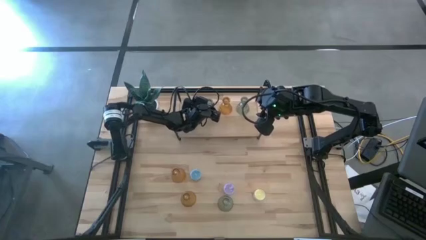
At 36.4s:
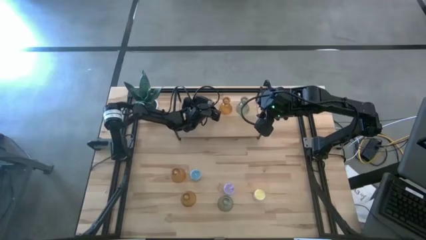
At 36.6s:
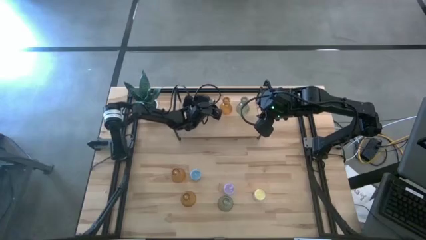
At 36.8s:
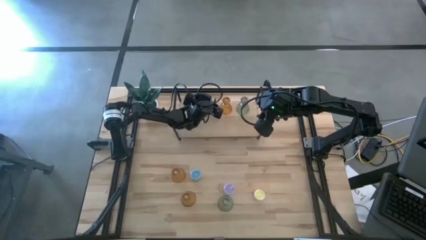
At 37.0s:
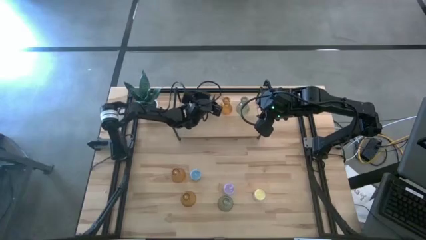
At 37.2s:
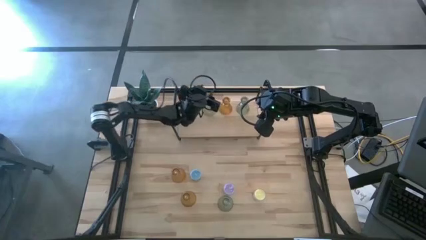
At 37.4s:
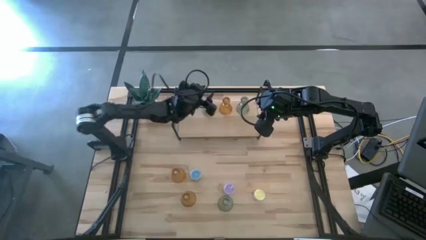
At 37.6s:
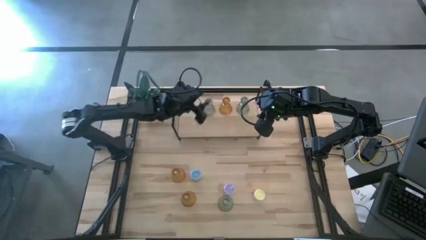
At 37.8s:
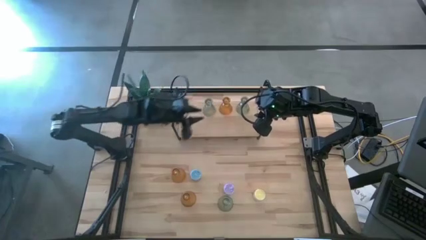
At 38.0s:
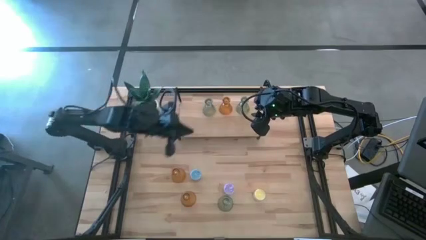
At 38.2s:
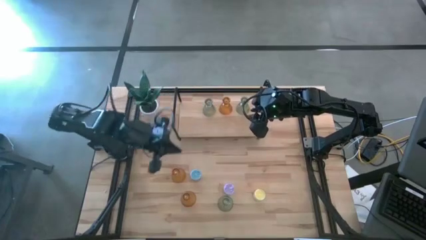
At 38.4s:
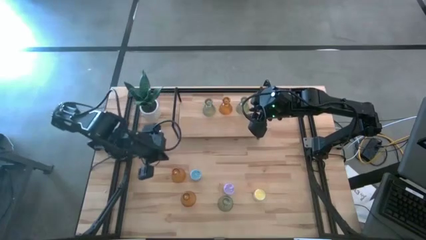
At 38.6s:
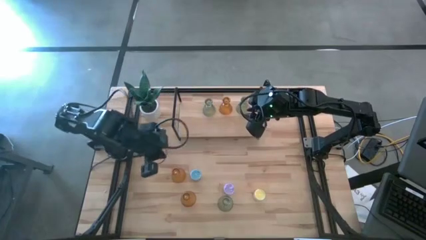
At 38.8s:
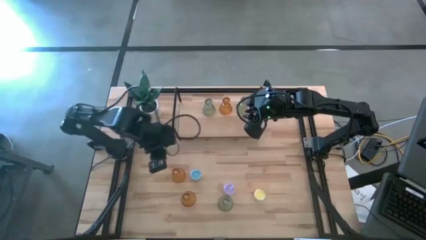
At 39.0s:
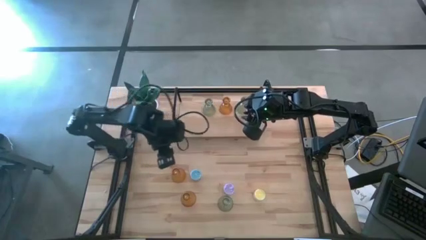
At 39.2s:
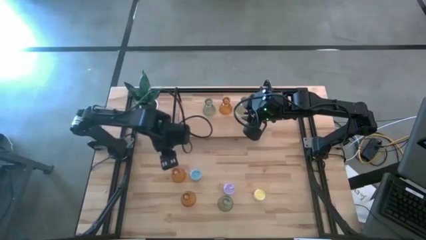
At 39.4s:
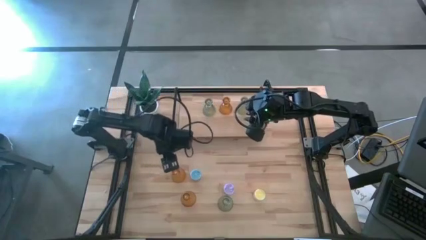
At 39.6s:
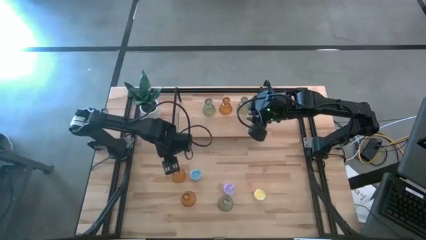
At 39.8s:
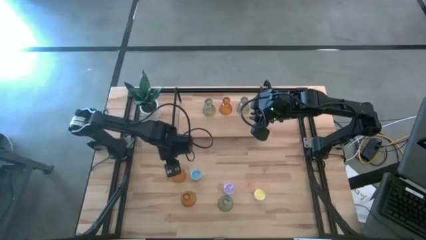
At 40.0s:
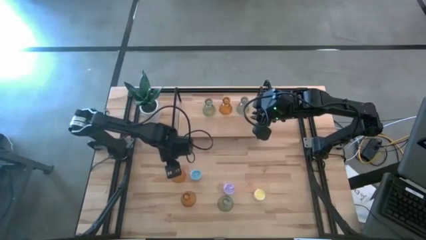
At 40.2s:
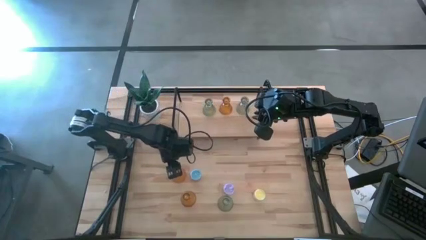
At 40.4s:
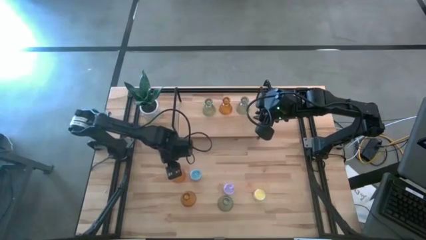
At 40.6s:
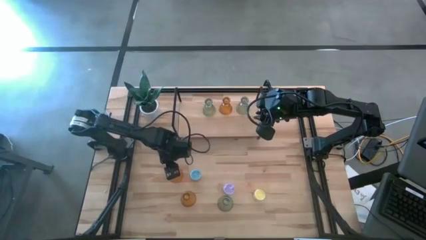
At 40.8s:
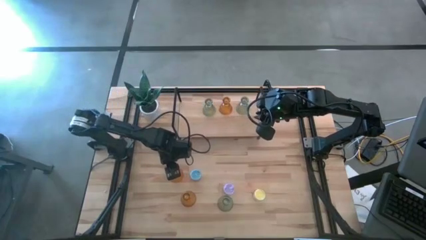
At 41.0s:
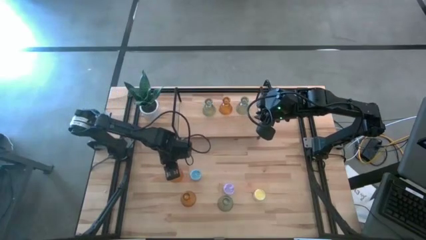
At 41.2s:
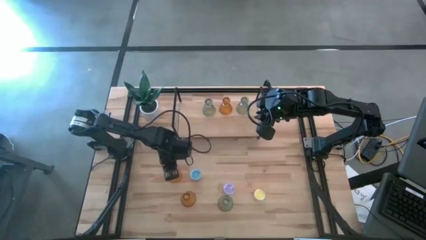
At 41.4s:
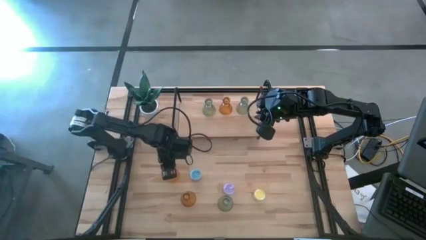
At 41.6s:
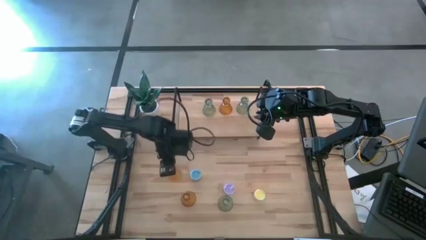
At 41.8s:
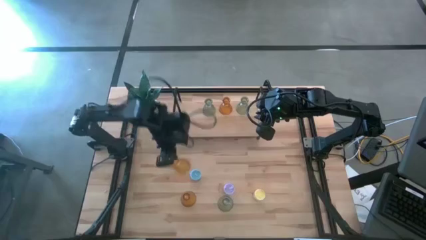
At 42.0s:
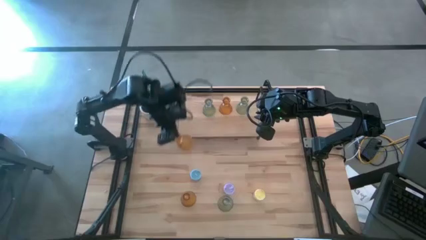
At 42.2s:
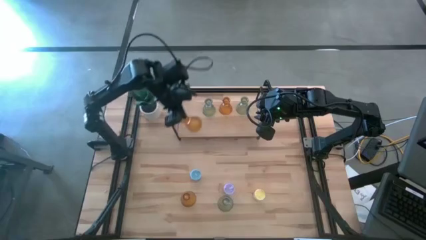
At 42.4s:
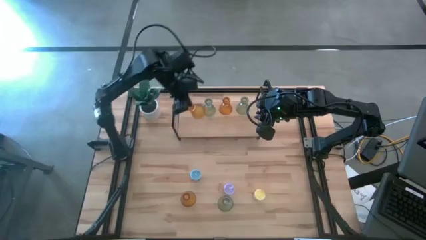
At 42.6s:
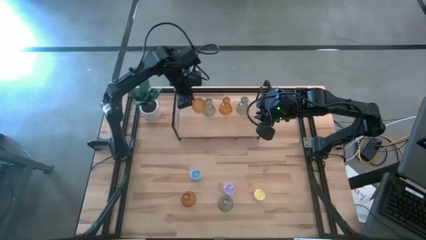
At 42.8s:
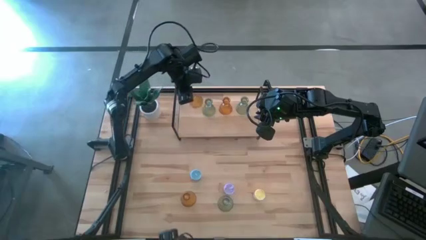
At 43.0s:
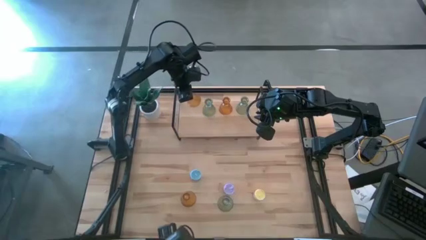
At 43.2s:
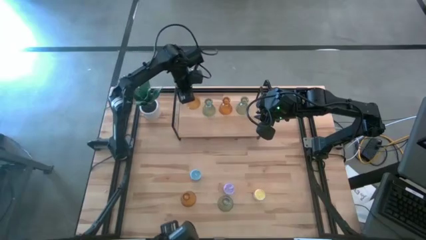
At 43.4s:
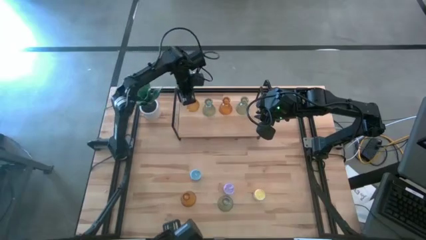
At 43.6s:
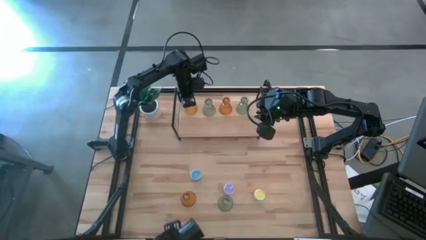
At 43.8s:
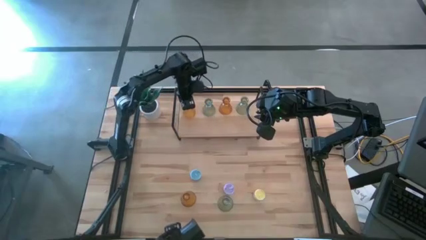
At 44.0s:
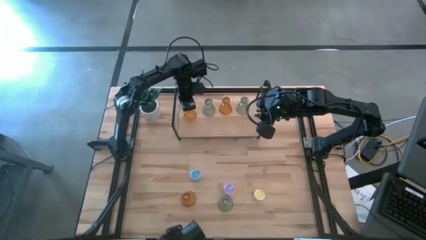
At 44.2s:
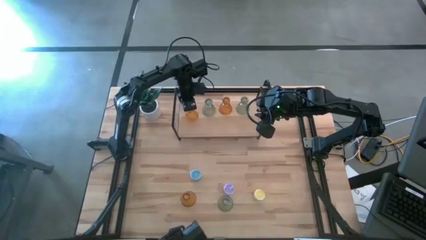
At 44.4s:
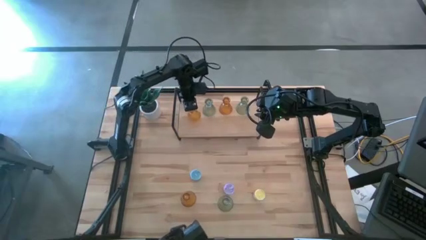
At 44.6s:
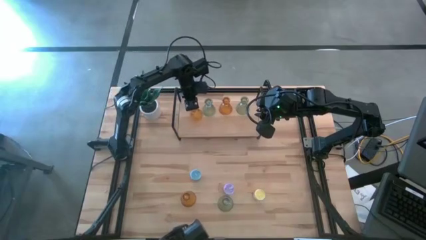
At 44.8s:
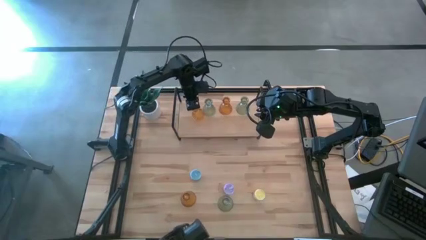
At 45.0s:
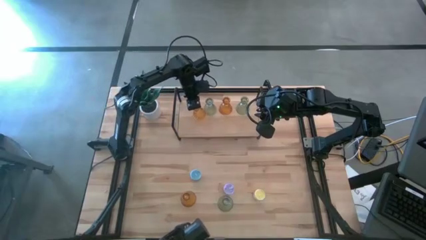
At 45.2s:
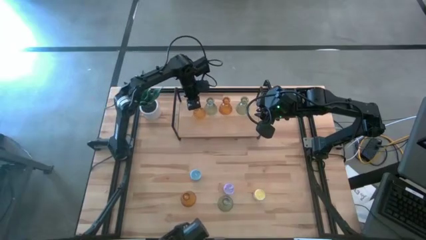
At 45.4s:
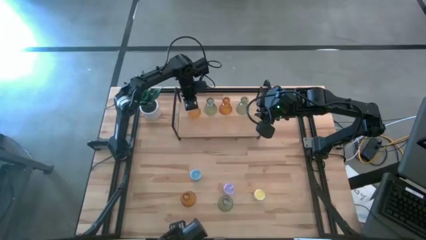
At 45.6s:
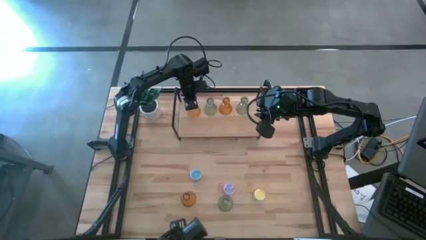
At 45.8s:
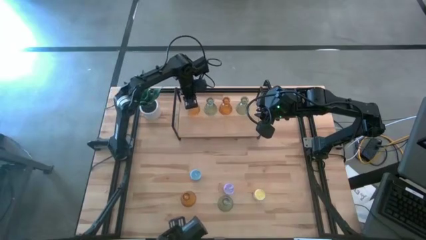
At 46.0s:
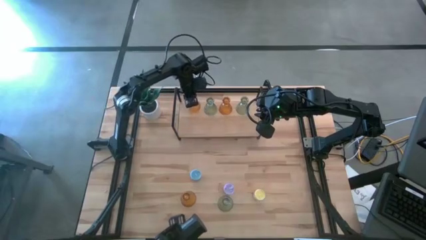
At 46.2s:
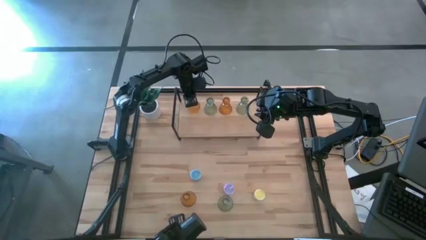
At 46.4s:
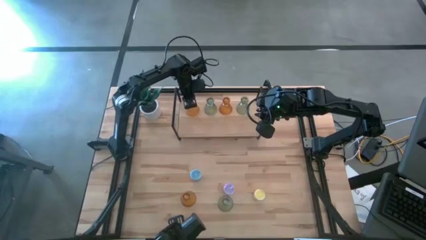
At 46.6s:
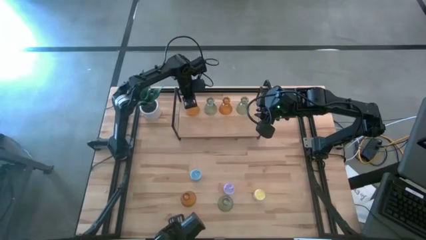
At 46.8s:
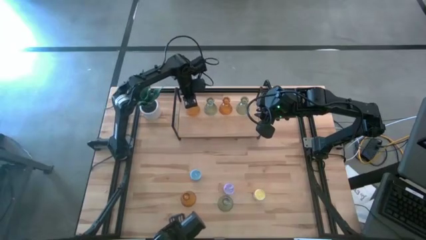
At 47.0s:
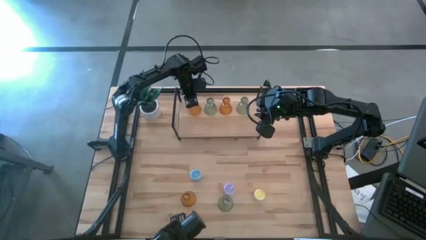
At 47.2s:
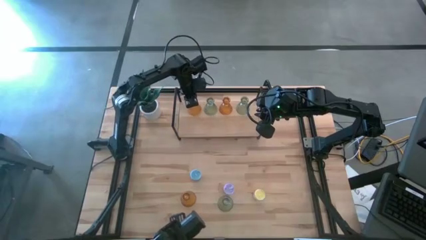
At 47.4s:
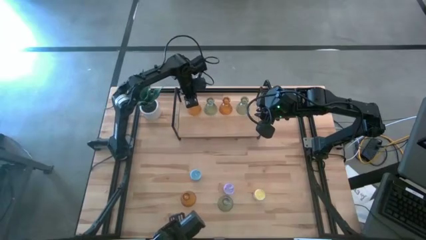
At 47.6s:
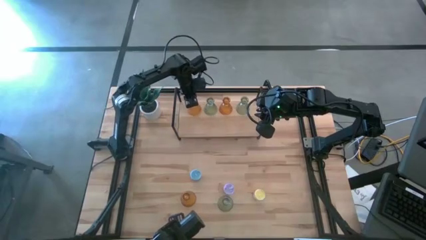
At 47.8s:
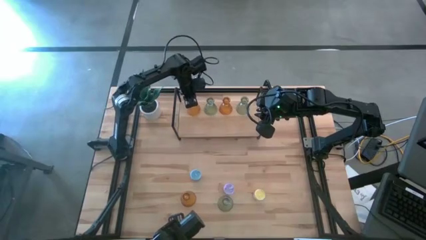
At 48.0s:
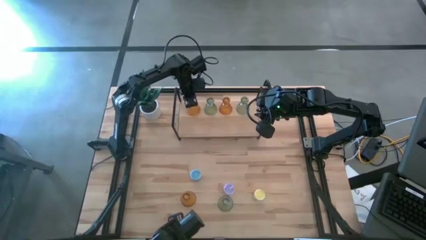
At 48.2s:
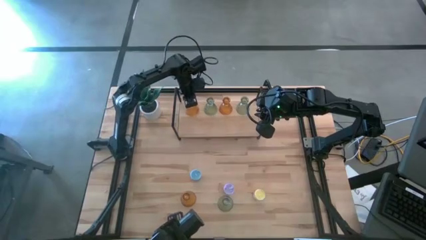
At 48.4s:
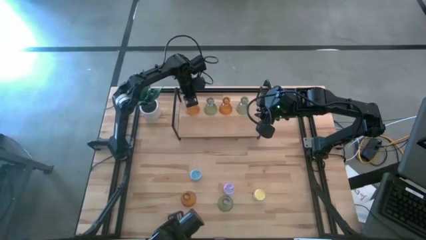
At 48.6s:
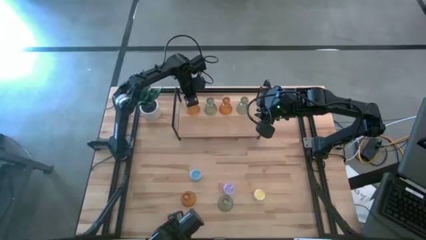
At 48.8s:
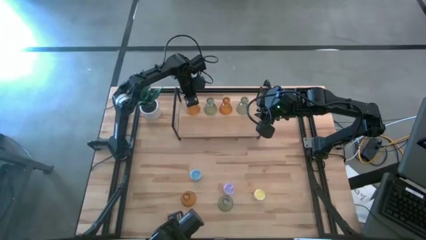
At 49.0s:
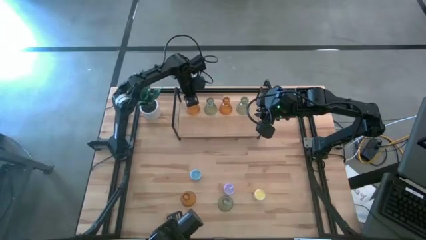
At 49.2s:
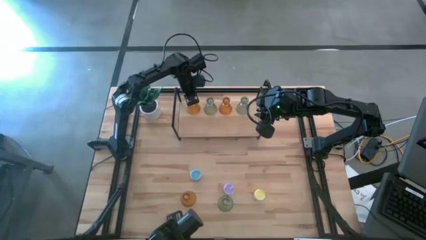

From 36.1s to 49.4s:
Task: Pick & Place candle stick holders
Put the top yellow glass candlestick on the shelf
